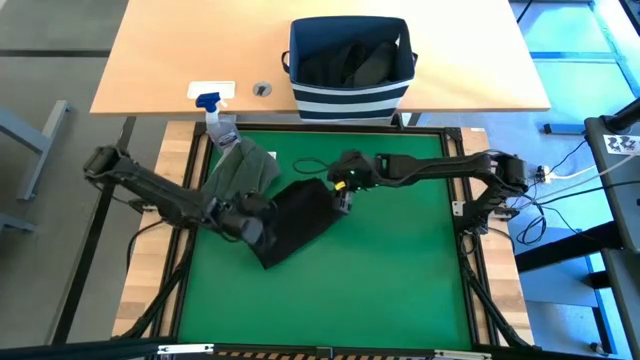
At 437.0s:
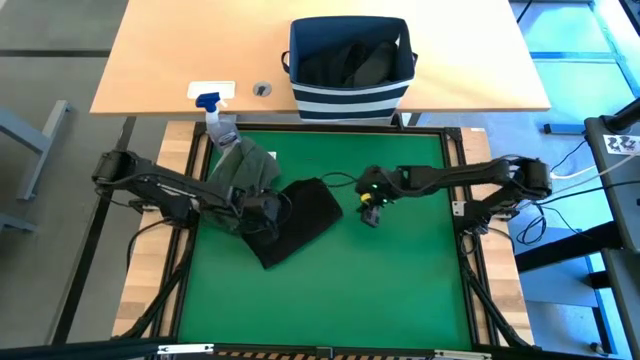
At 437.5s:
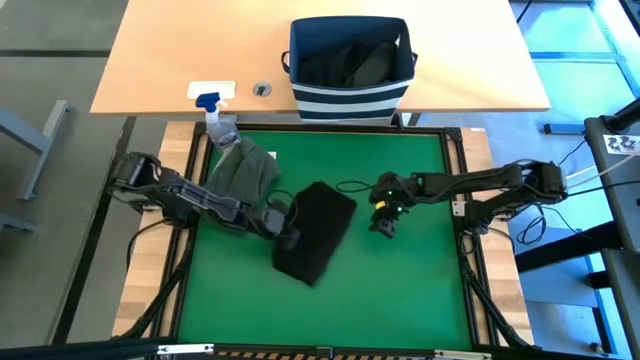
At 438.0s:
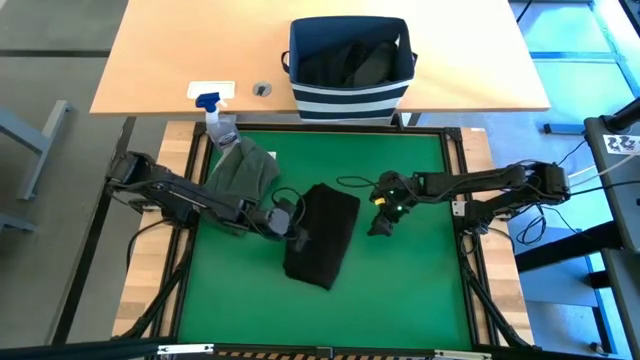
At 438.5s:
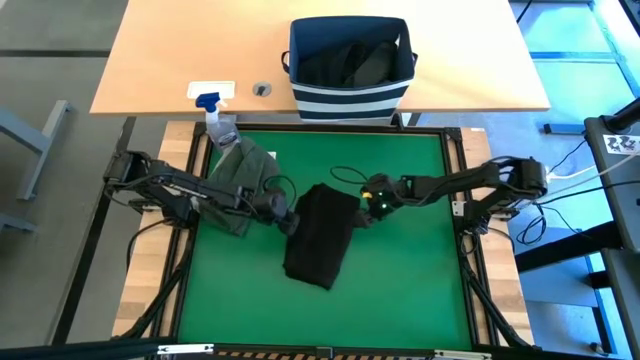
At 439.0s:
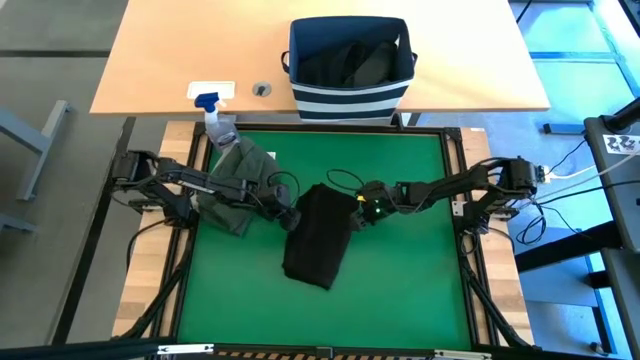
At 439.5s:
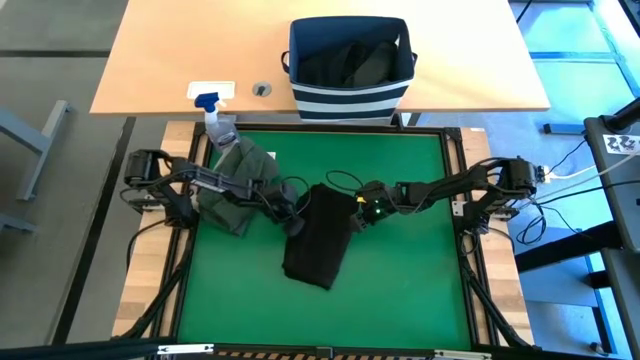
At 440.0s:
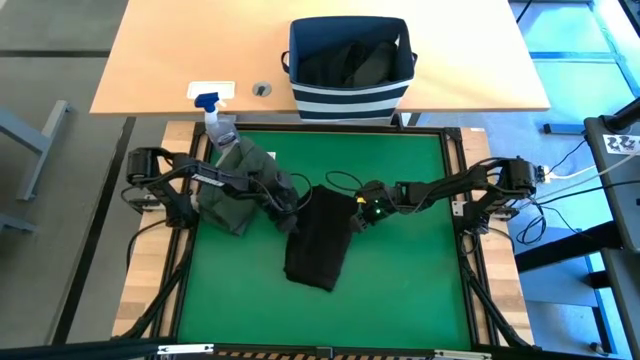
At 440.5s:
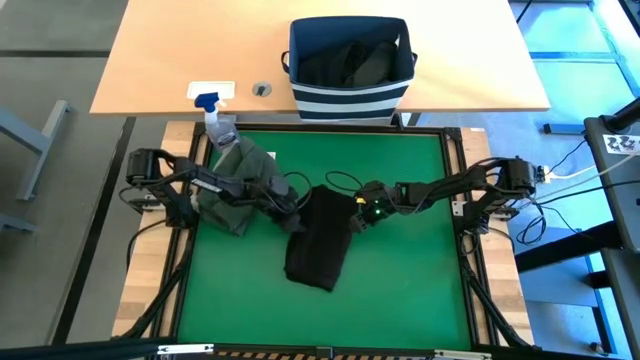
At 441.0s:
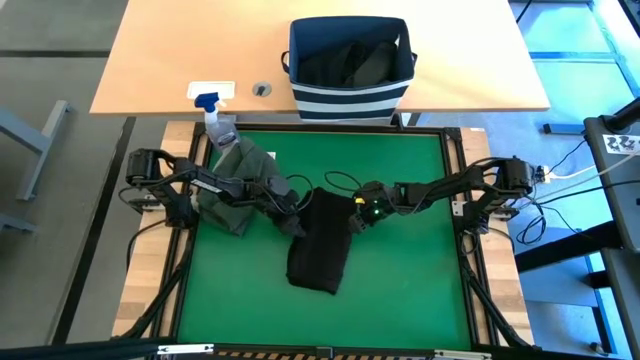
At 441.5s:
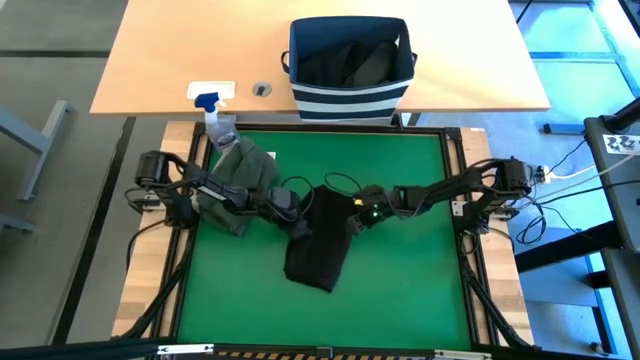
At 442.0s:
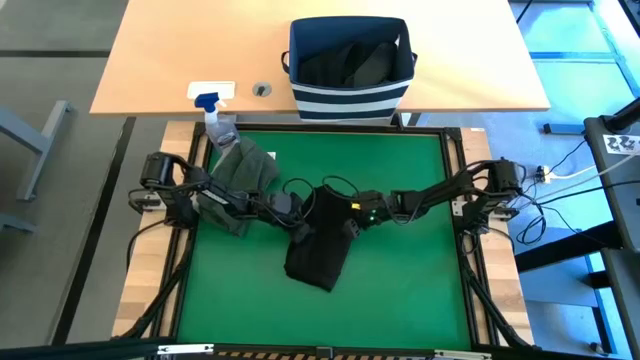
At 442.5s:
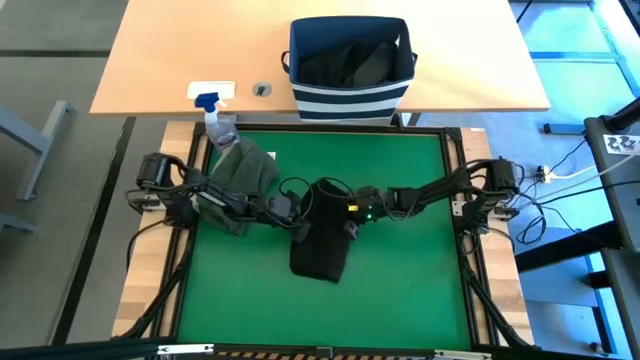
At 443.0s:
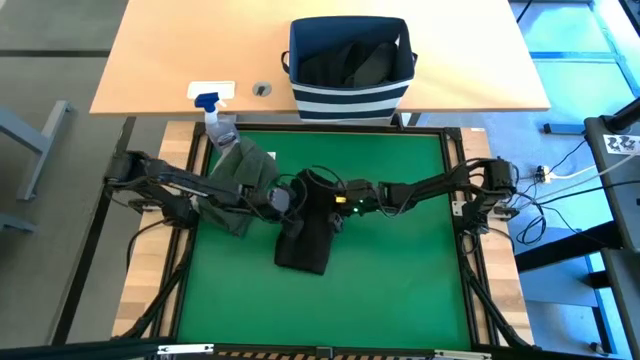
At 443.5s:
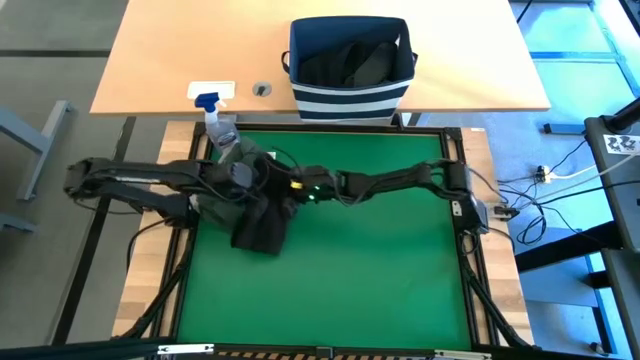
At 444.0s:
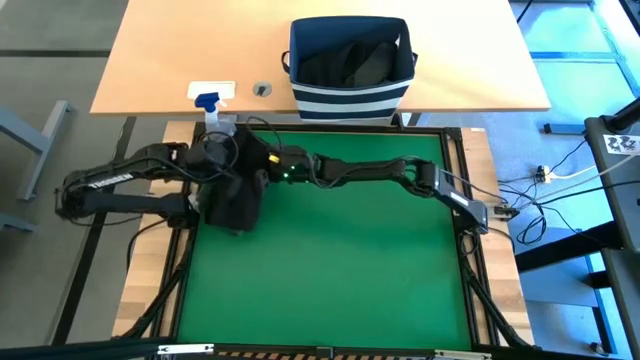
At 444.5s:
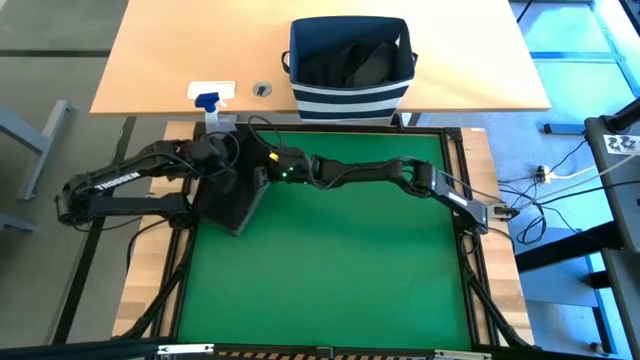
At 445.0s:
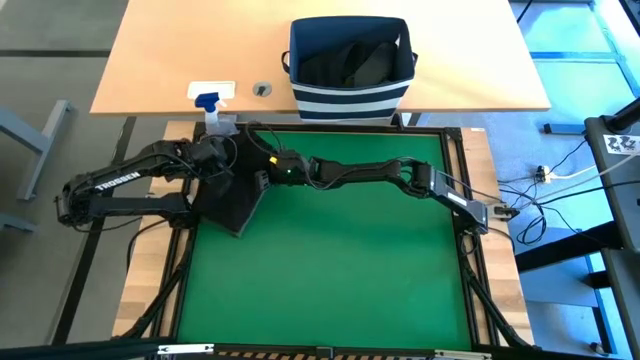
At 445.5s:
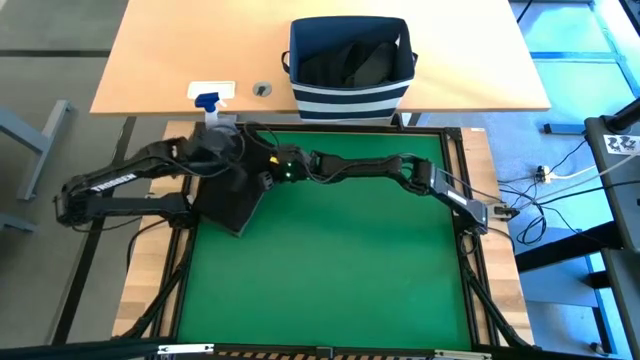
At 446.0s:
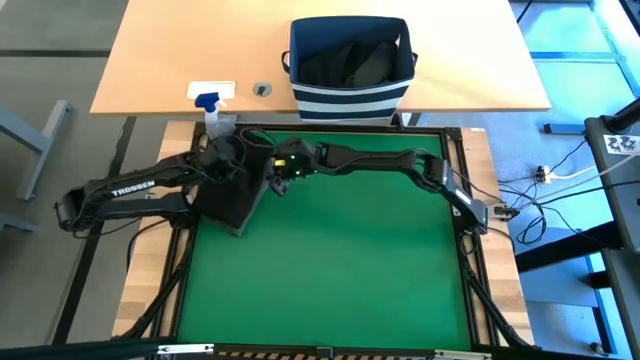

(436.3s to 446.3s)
Task: Fold Laundry from Bin
Stack the black shirt on top of the green shirt on the table

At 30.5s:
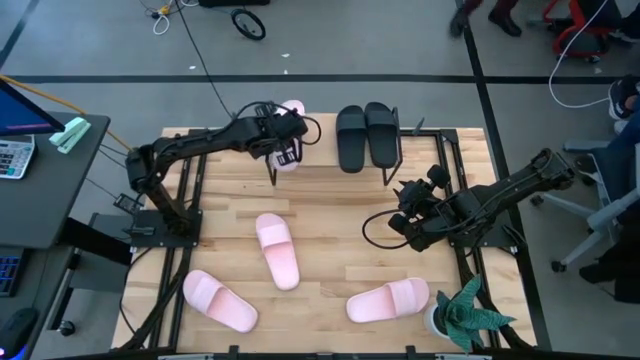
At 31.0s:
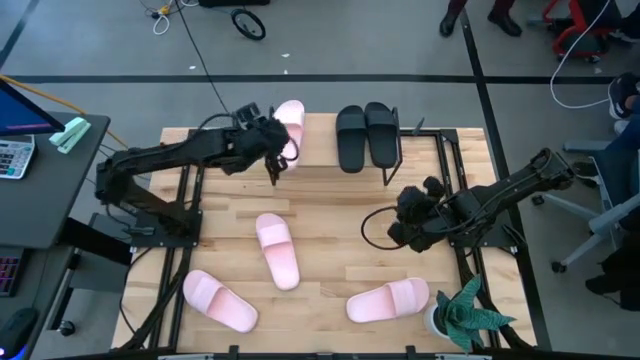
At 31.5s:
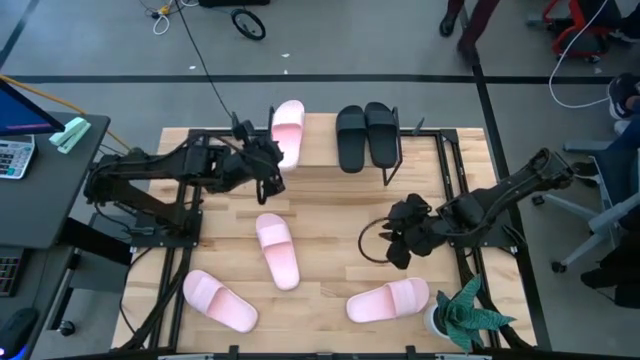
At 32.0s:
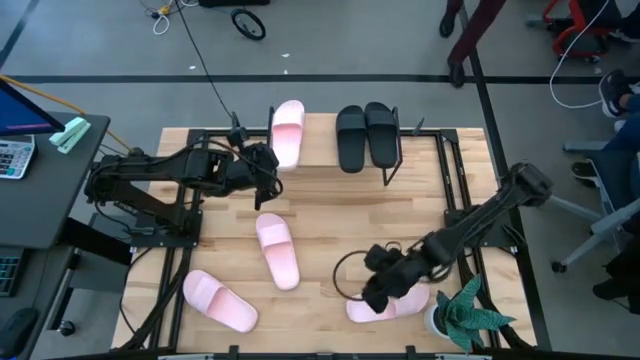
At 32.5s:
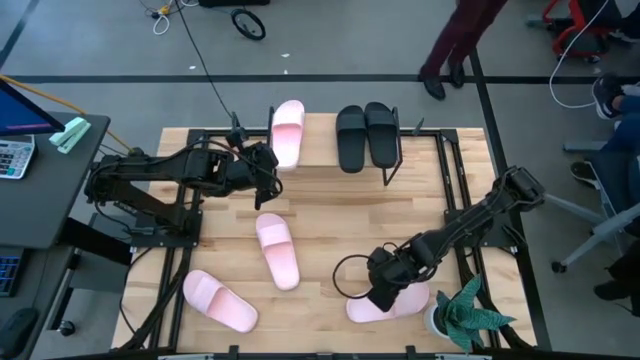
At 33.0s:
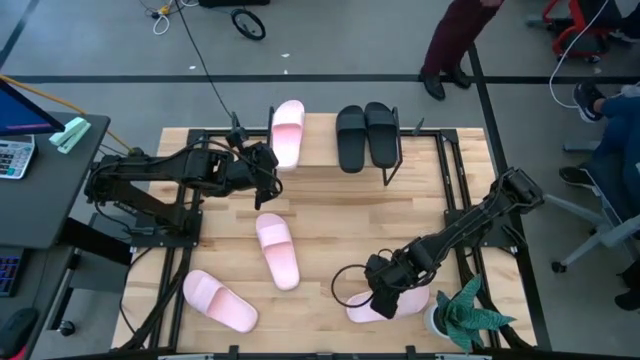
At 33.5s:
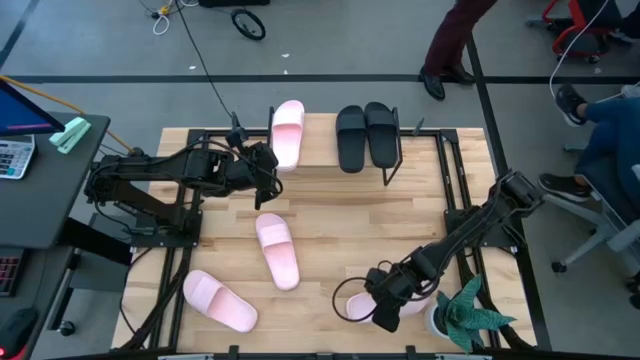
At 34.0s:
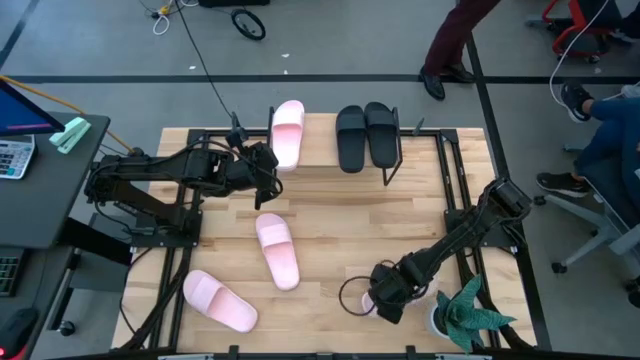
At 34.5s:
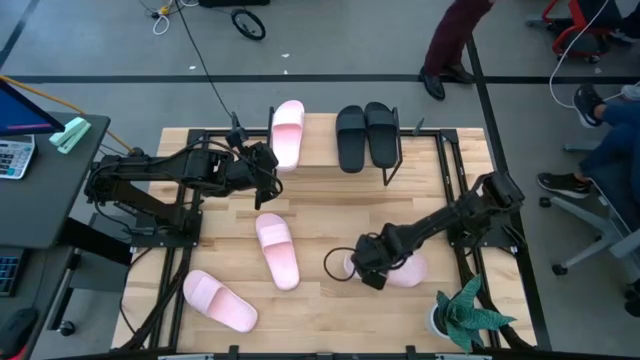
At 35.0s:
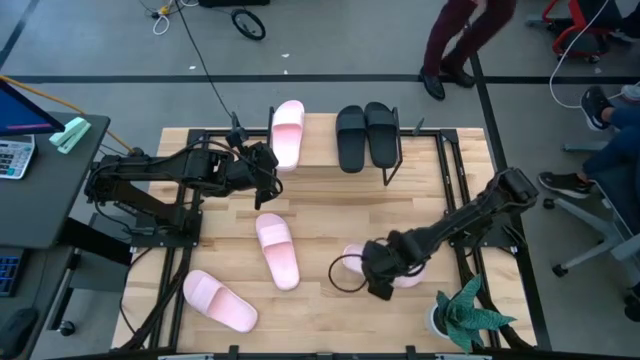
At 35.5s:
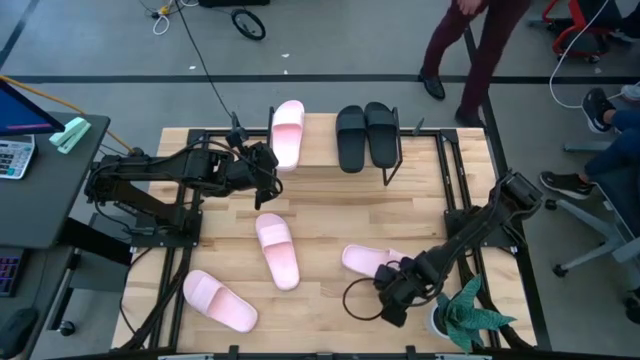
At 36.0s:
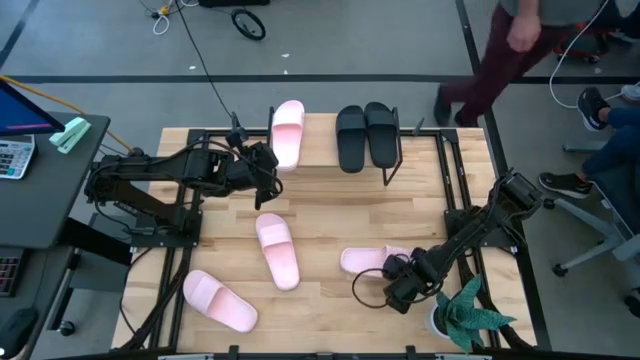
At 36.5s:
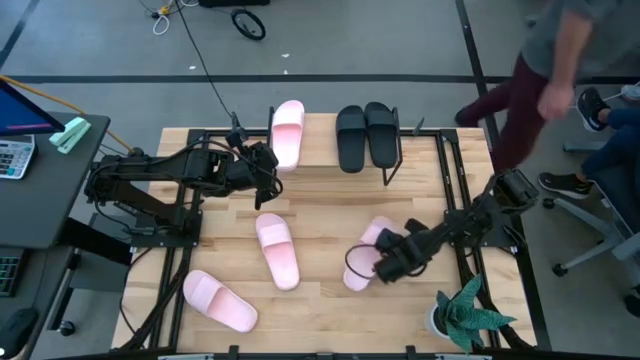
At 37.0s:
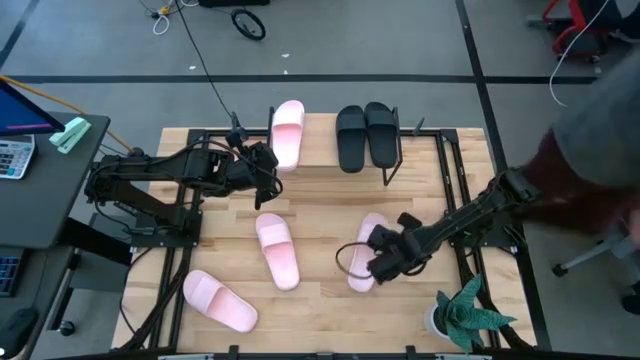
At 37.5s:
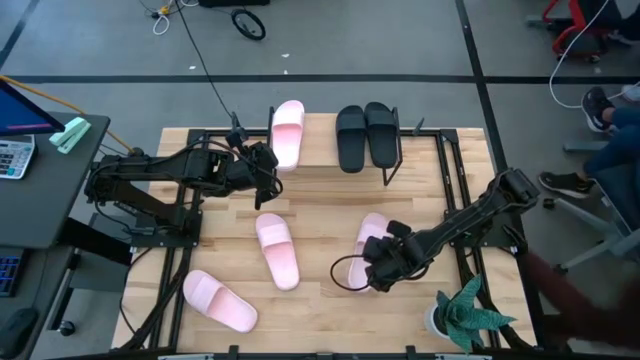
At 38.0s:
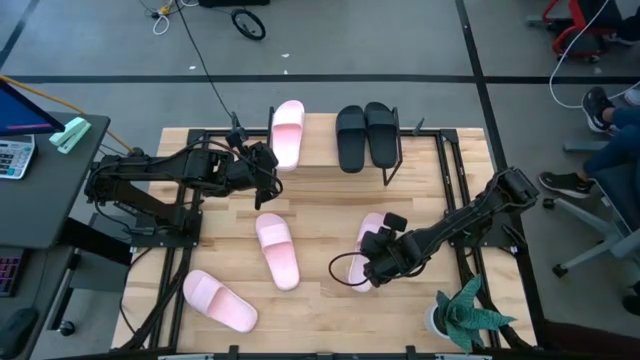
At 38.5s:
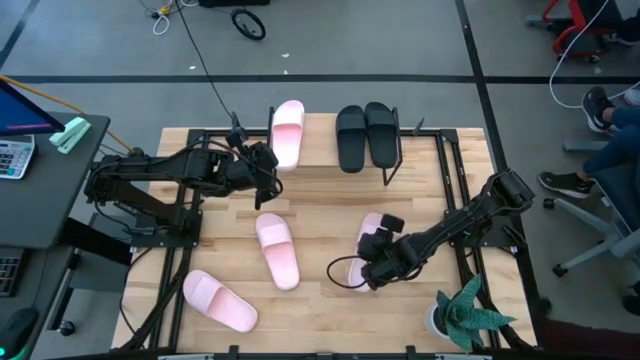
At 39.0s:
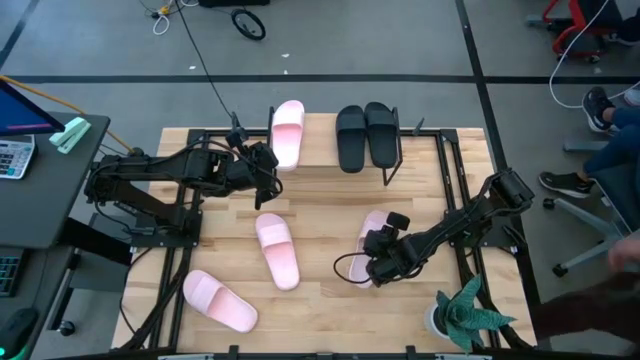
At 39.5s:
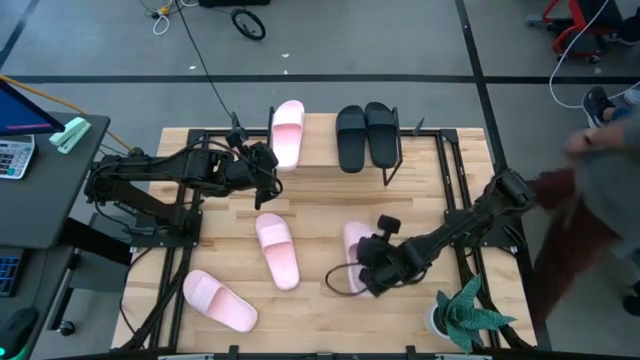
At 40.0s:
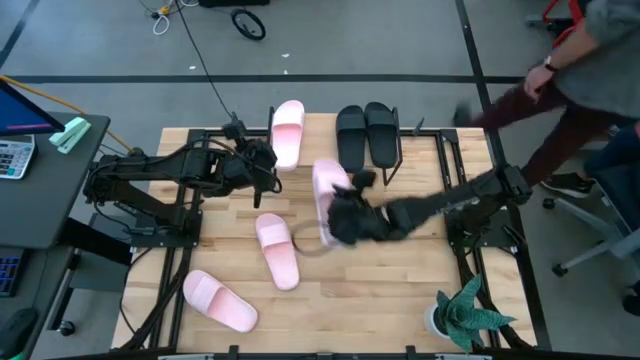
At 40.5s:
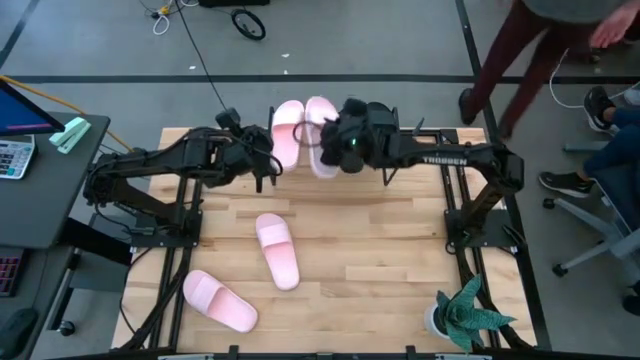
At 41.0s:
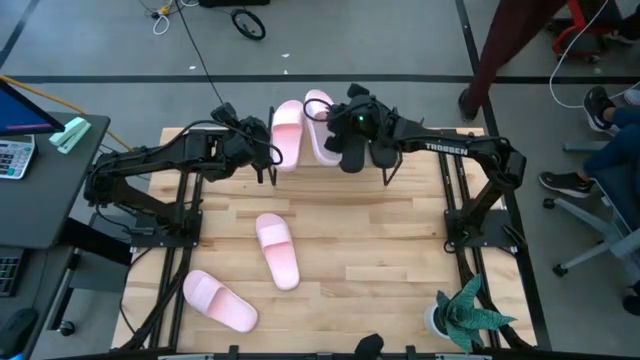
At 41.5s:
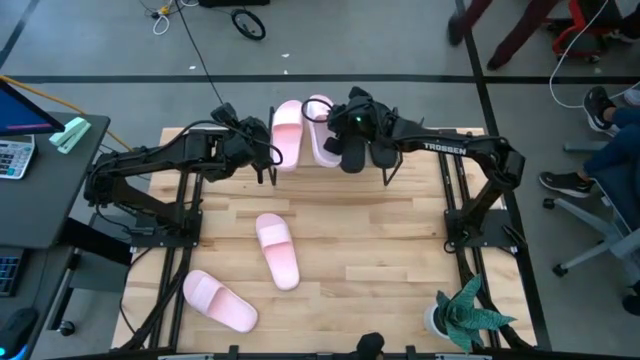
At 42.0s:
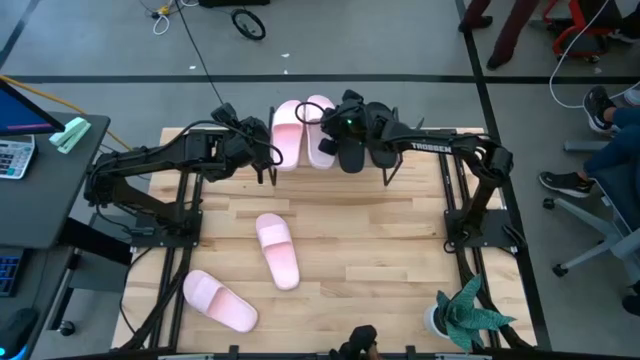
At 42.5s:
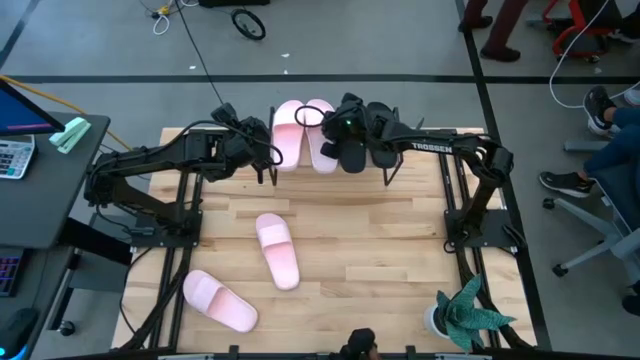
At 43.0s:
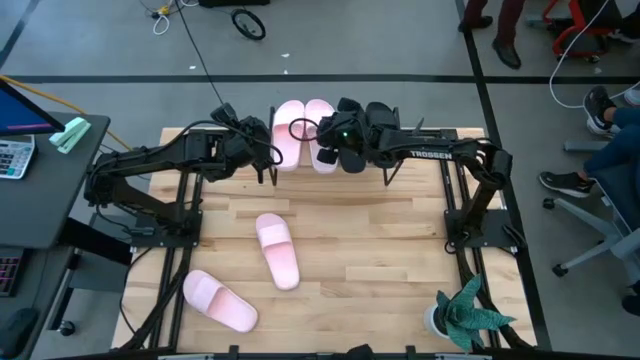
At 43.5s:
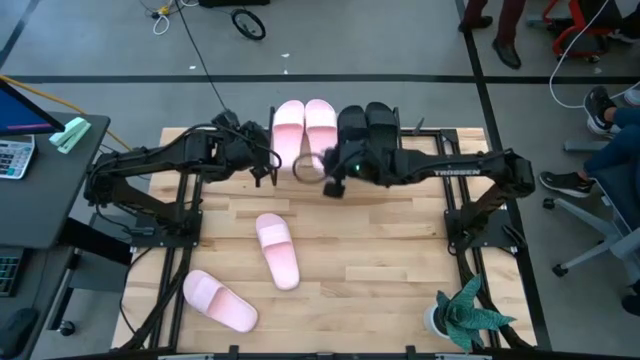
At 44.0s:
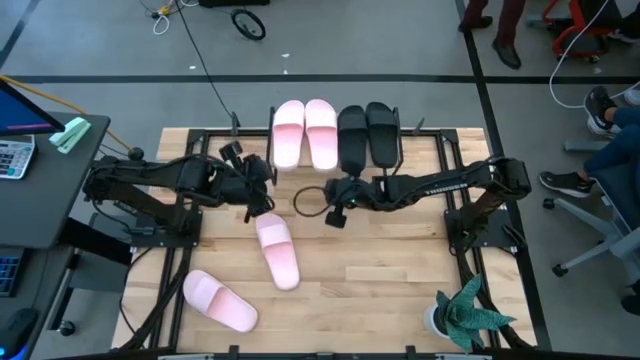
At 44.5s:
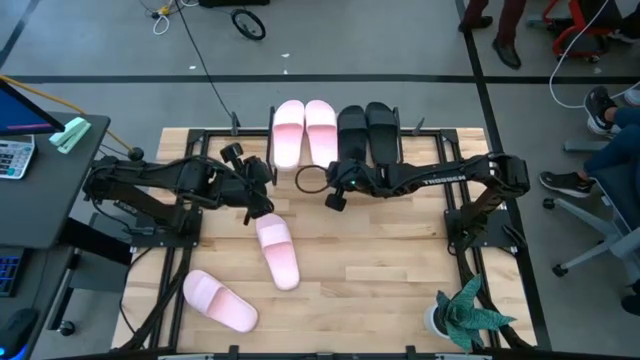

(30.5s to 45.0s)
Task: Pick and place slides into the shelf
Put the bottom right pink slide on the shelf
